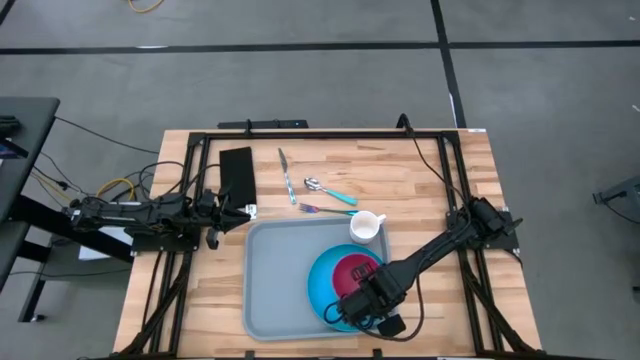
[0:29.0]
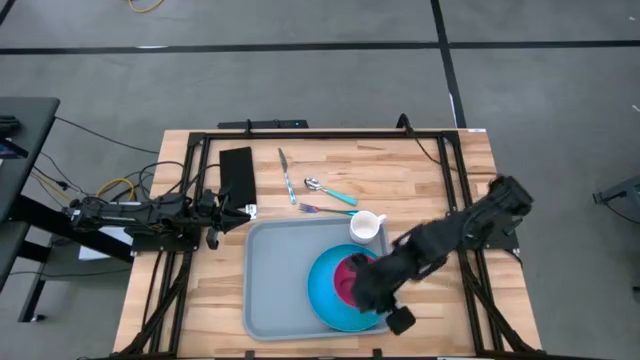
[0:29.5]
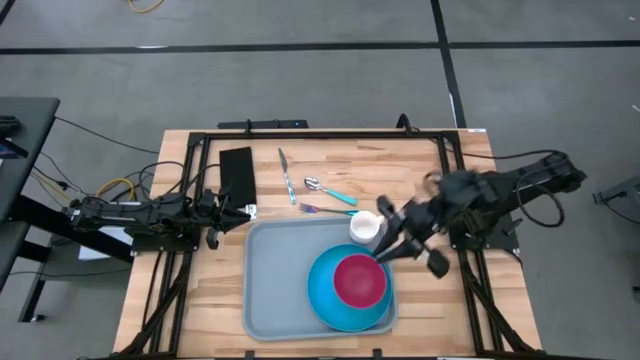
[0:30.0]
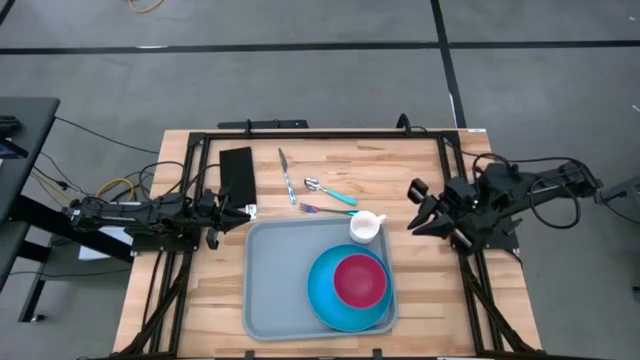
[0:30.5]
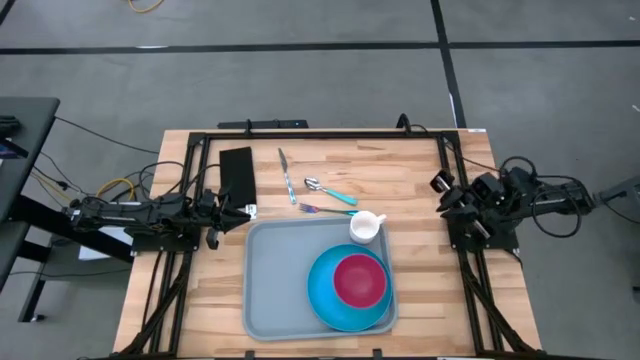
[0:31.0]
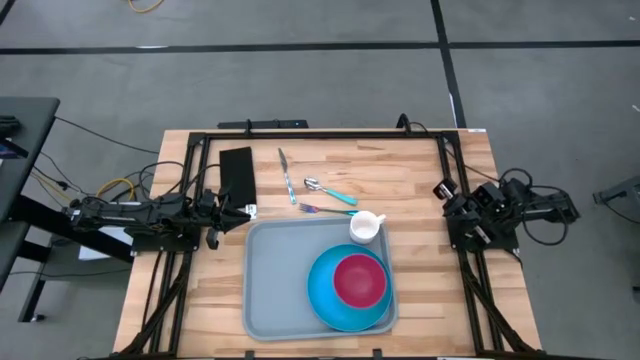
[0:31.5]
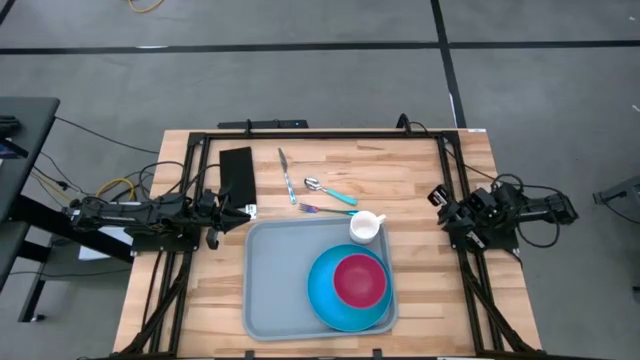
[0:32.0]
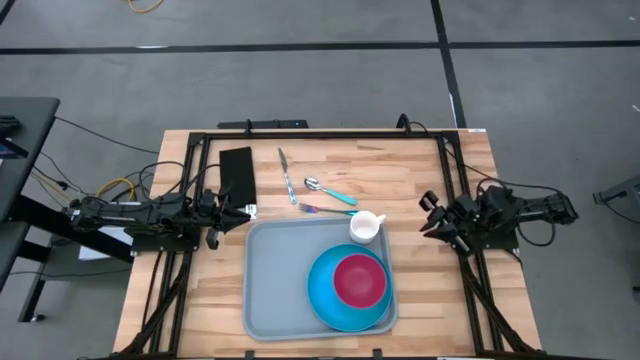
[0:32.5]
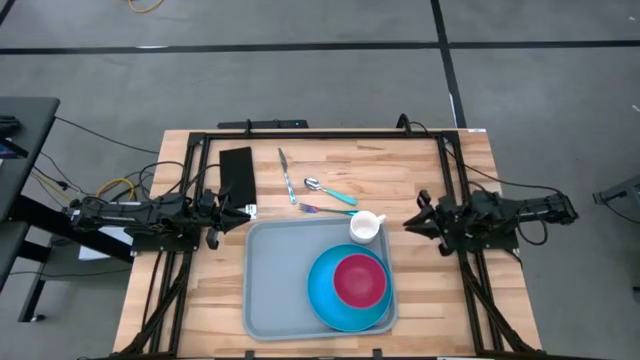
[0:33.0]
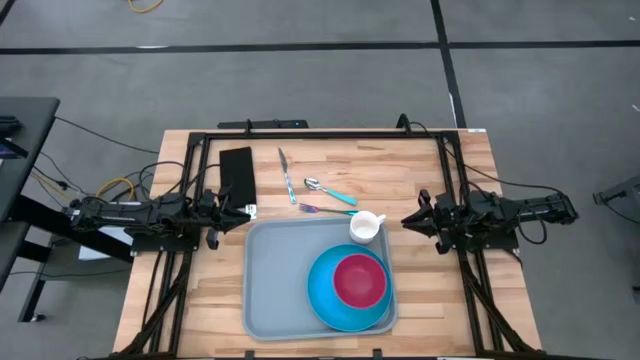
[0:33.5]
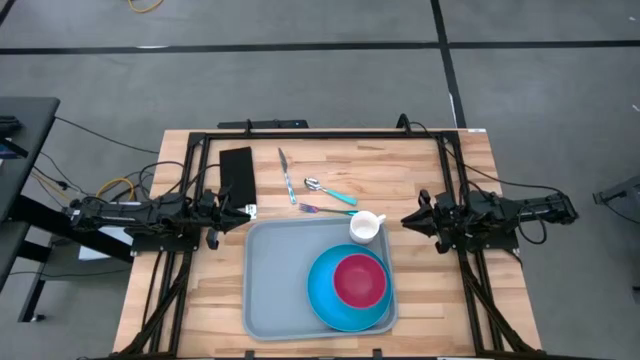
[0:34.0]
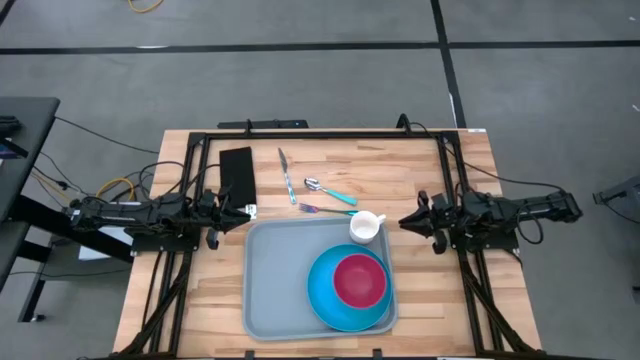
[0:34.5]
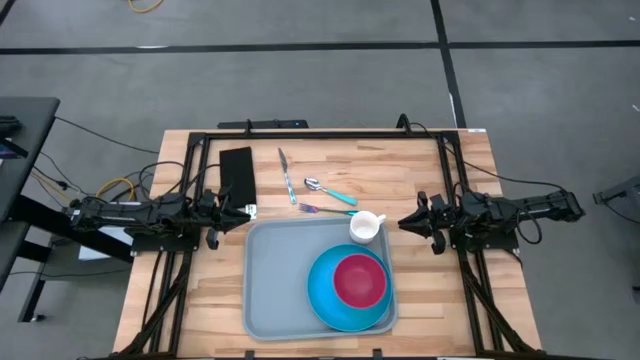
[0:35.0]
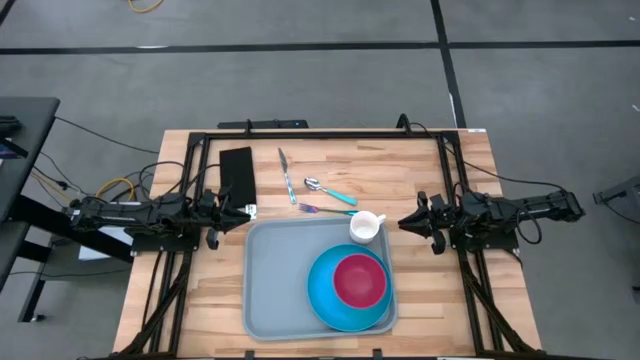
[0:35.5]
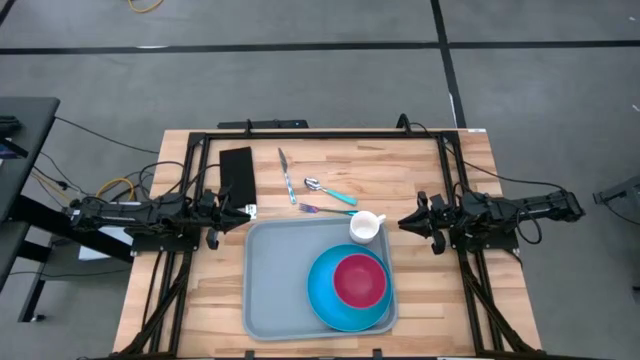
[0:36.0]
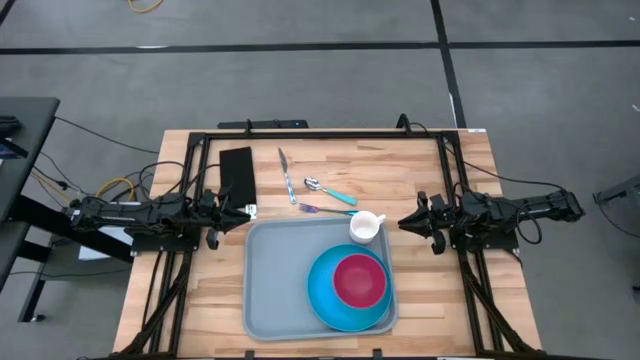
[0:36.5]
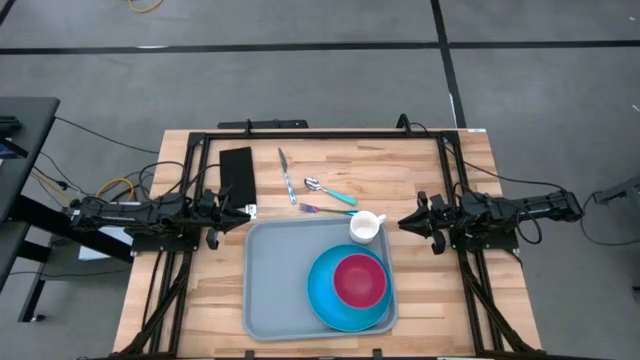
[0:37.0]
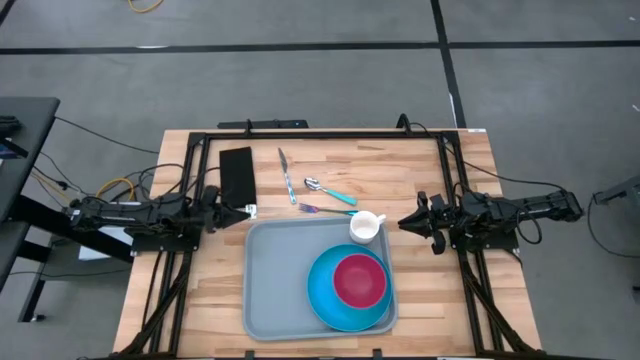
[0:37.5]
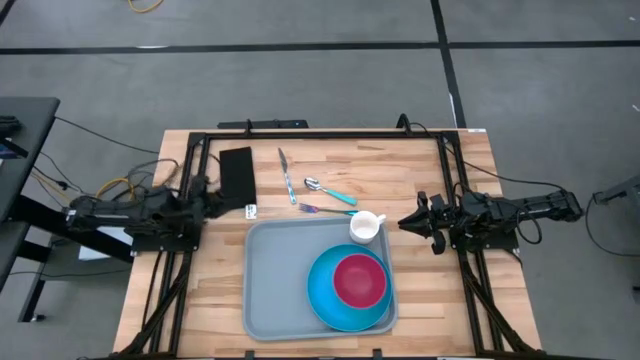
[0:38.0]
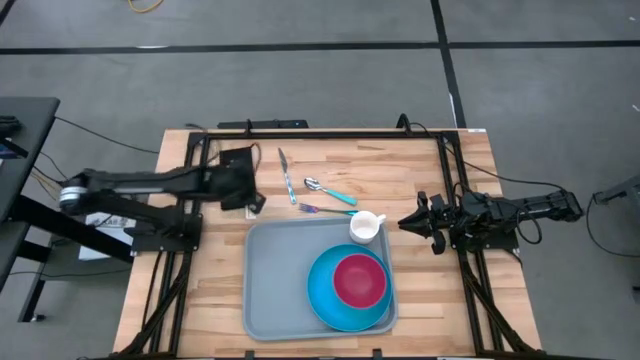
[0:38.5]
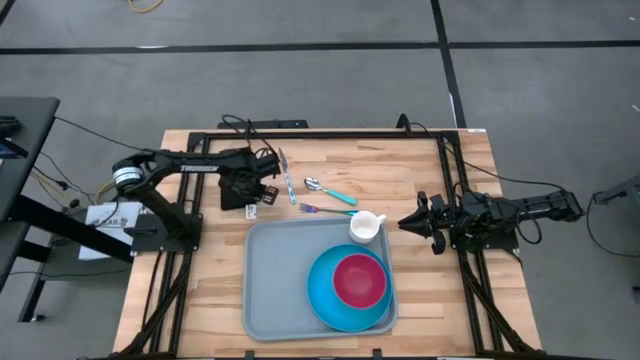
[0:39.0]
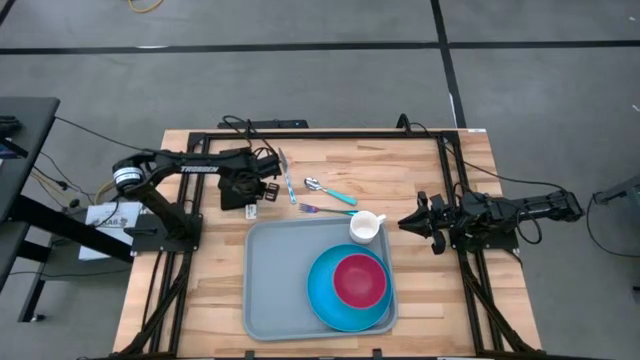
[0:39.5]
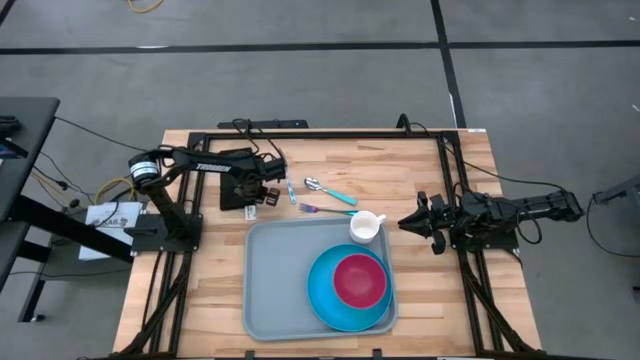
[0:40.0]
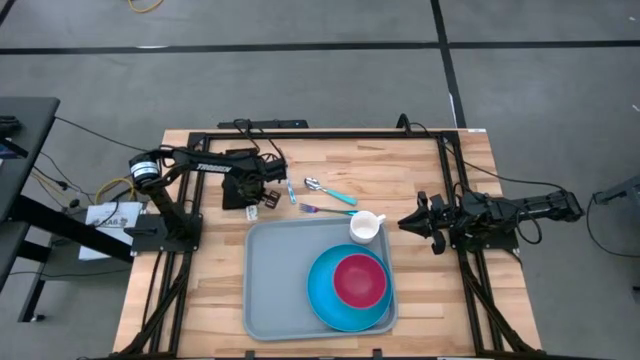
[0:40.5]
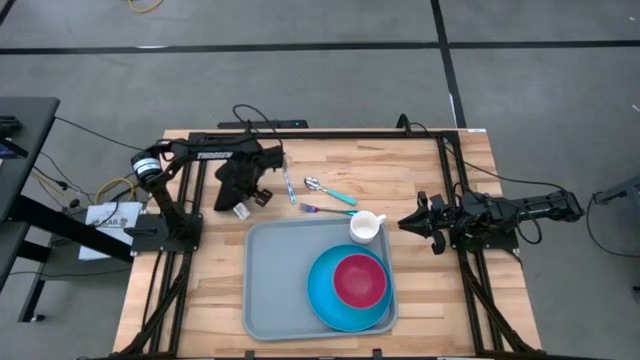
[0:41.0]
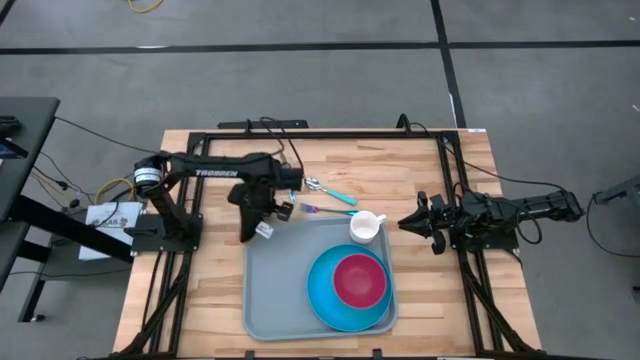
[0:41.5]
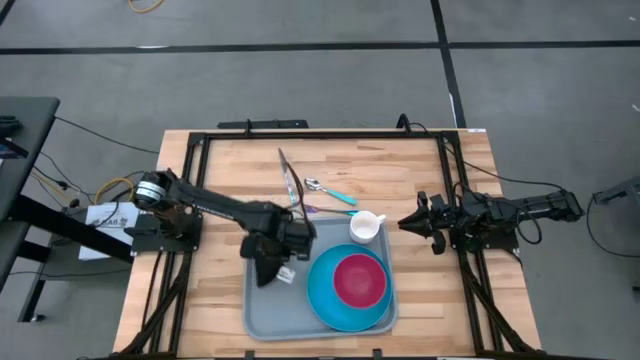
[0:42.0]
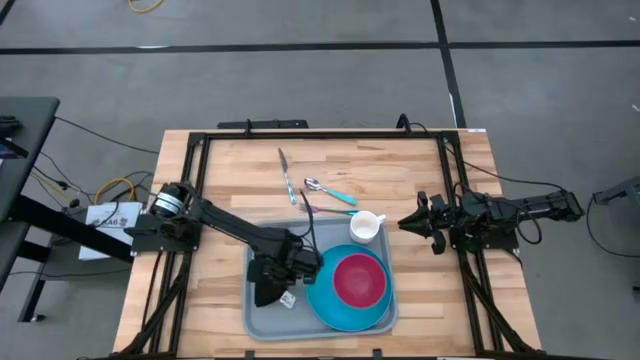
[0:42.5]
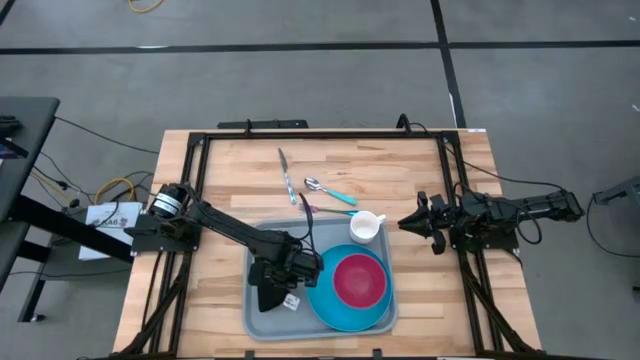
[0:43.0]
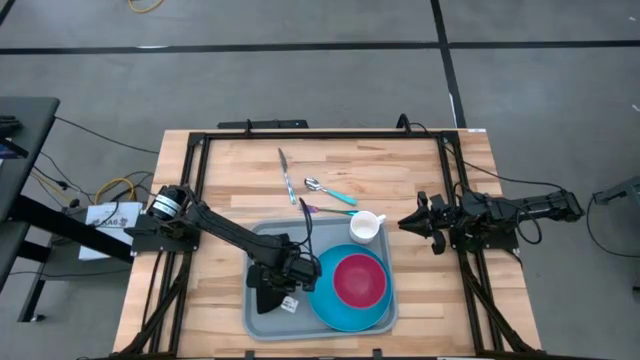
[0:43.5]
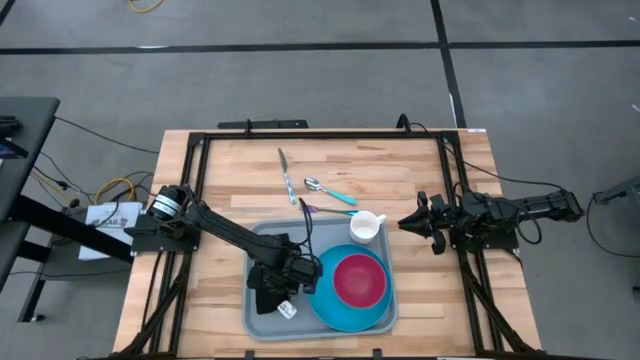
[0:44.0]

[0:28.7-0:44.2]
Task: Set up tray
Put the black napkin on the gray serving tray to the left of the blue plate

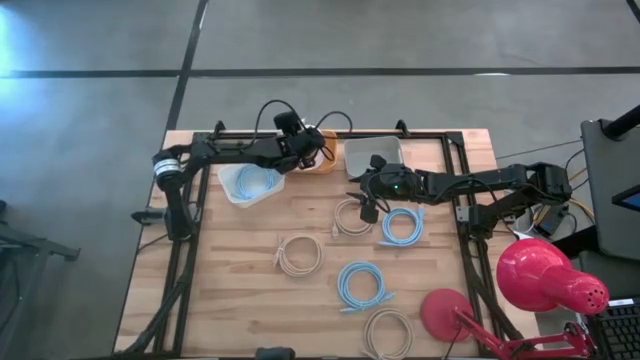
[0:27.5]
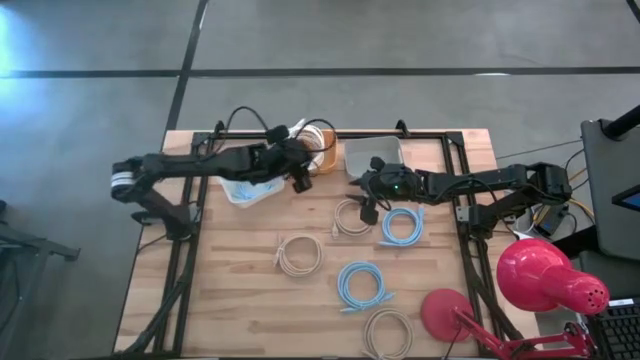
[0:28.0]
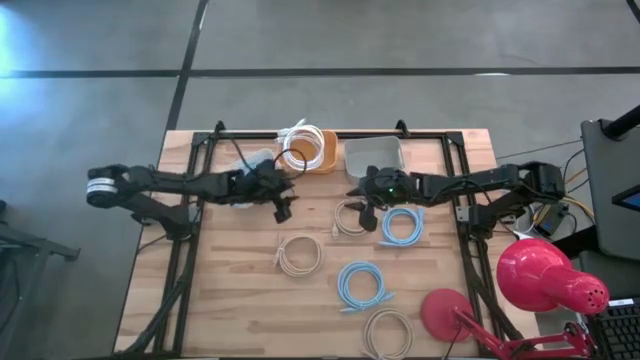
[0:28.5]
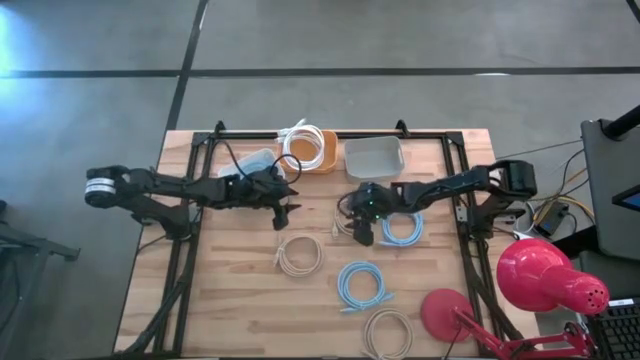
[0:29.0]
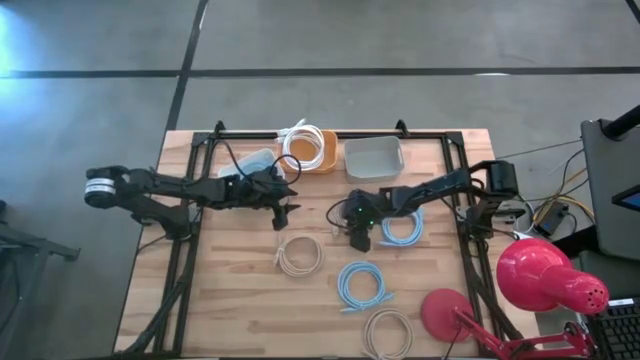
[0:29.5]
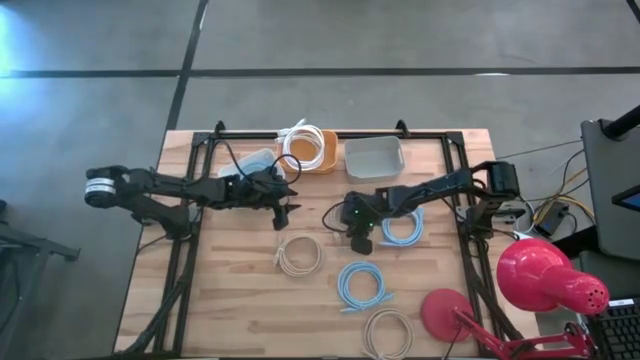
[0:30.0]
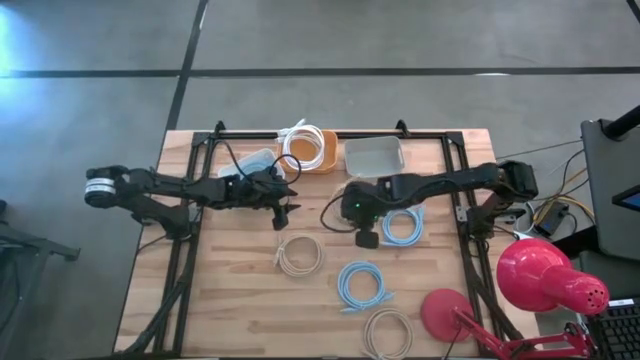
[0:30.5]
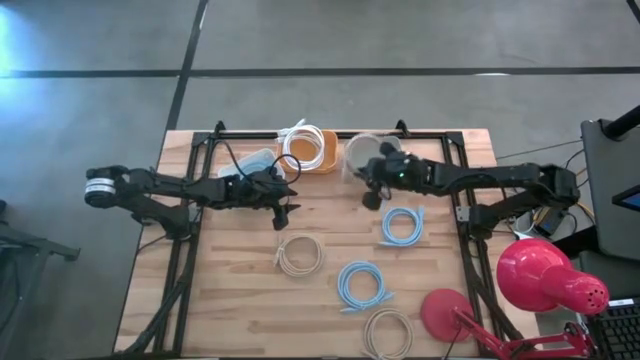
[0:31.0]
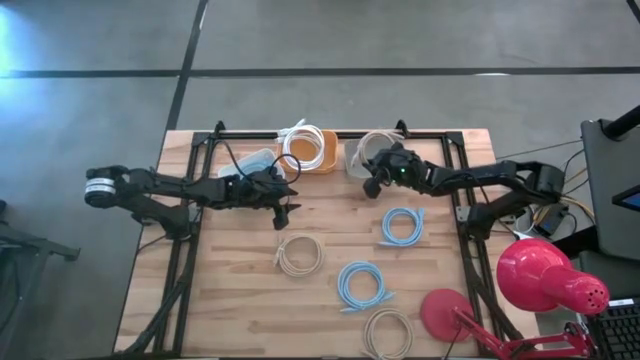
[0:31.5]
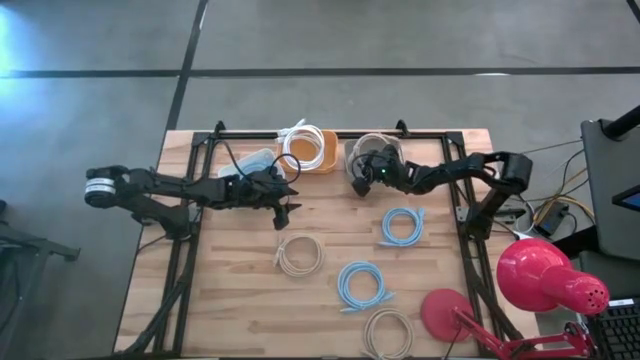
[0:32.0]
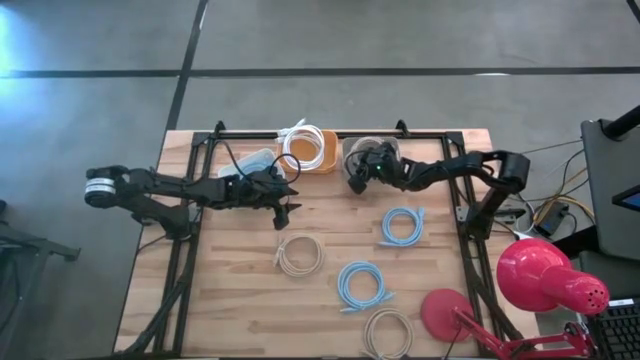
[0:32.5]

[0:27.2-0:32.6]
Task: Sort HDMI cables
Put the top brown HDMI cable into the brown bin
